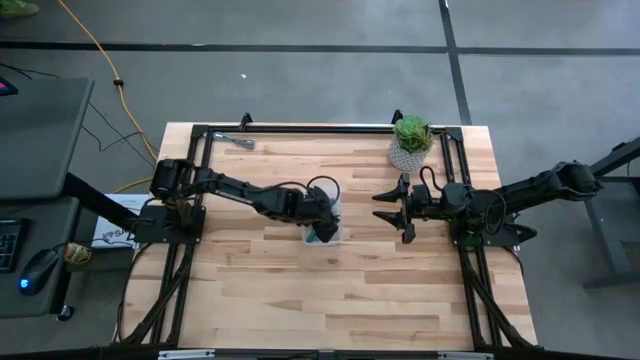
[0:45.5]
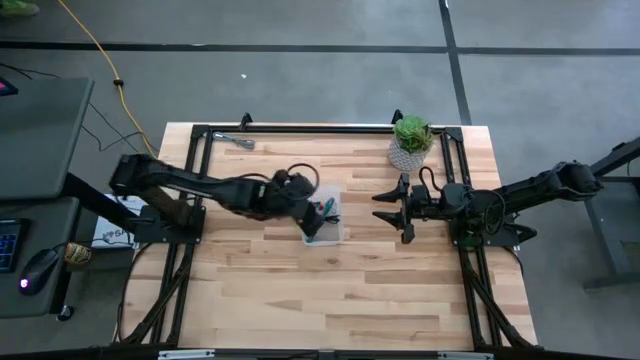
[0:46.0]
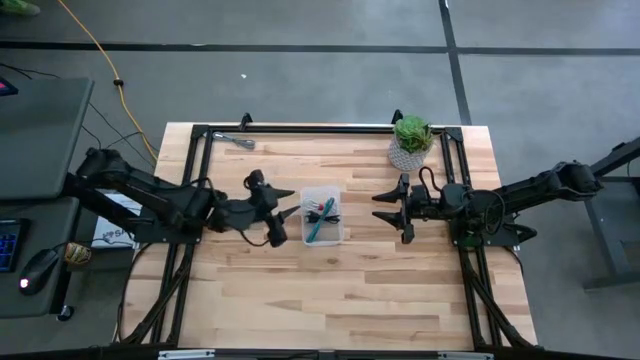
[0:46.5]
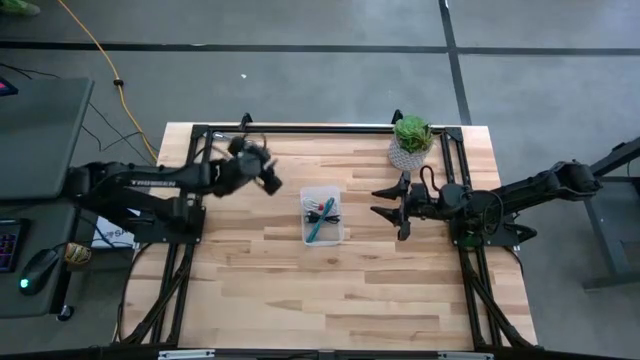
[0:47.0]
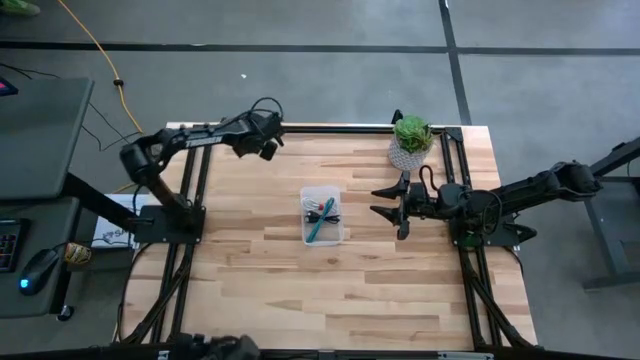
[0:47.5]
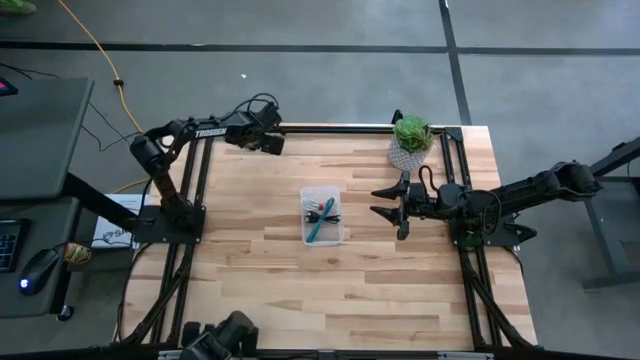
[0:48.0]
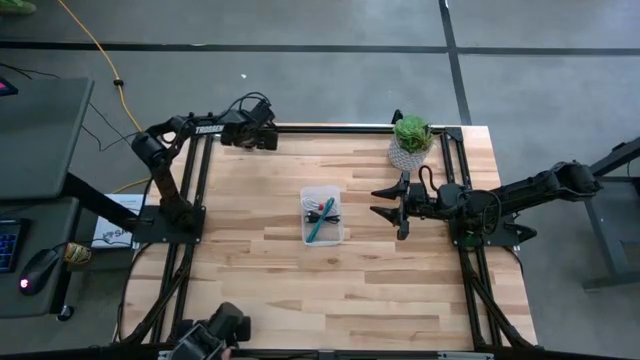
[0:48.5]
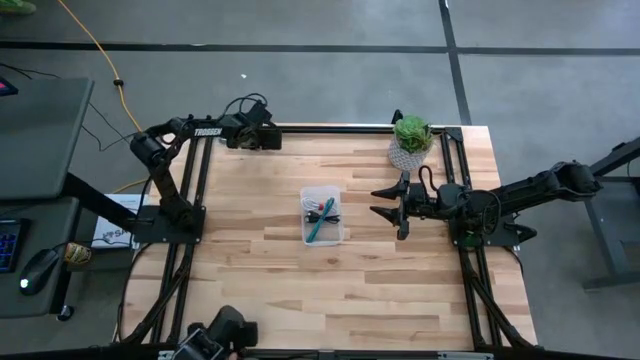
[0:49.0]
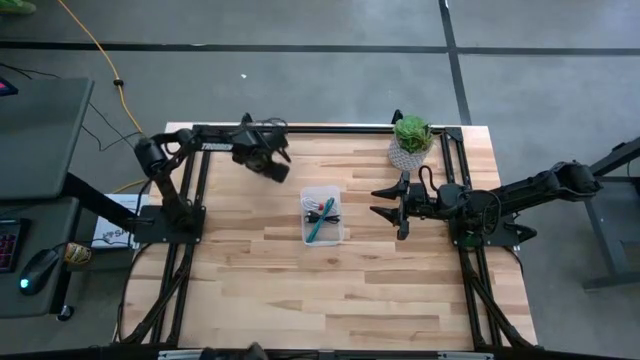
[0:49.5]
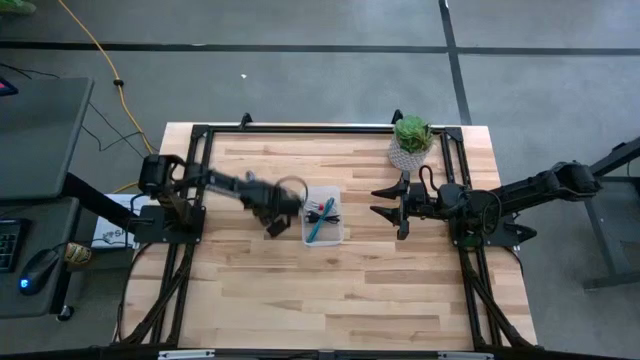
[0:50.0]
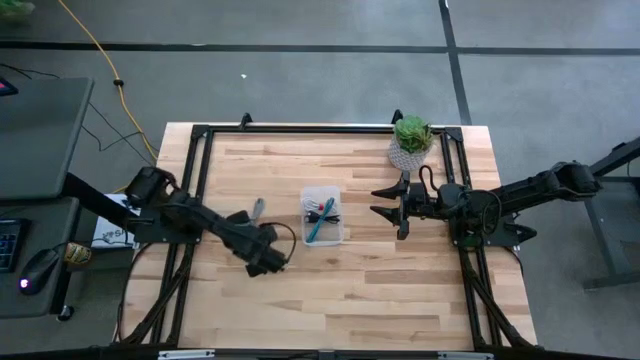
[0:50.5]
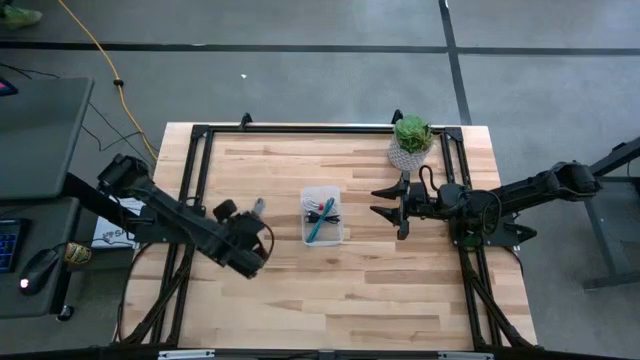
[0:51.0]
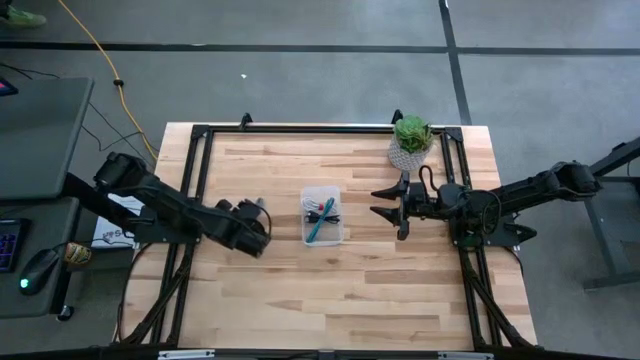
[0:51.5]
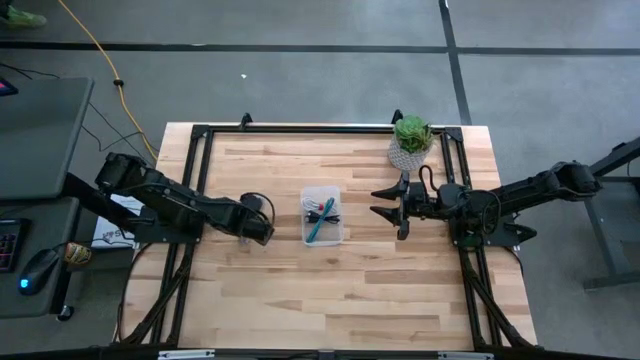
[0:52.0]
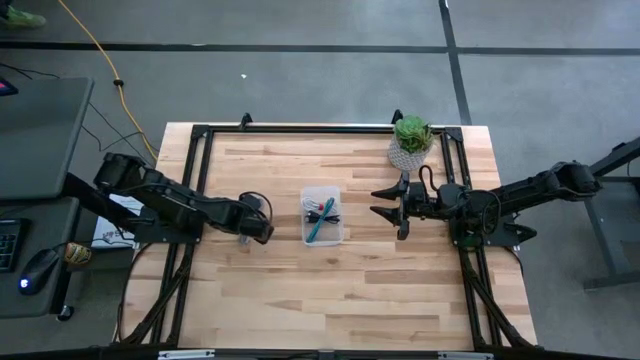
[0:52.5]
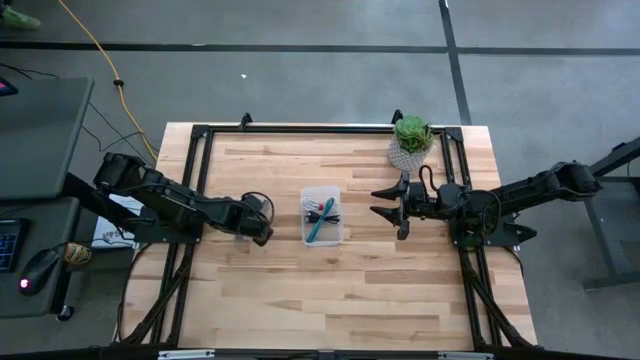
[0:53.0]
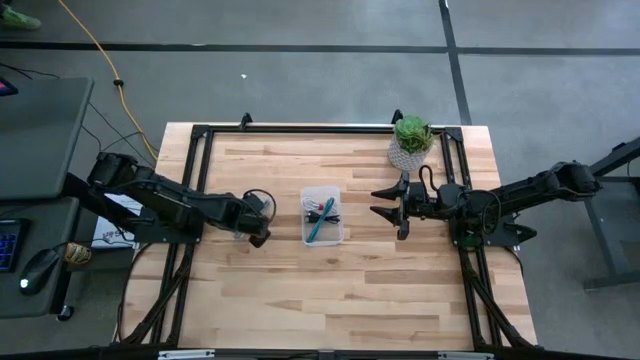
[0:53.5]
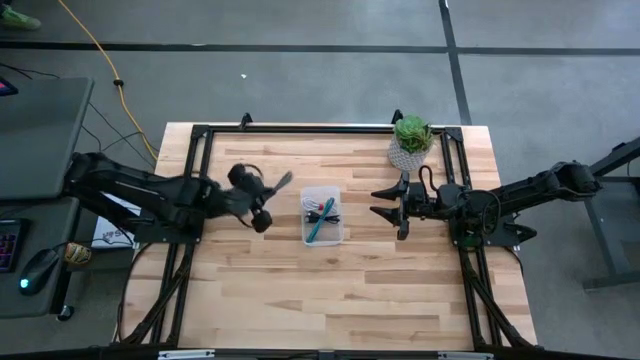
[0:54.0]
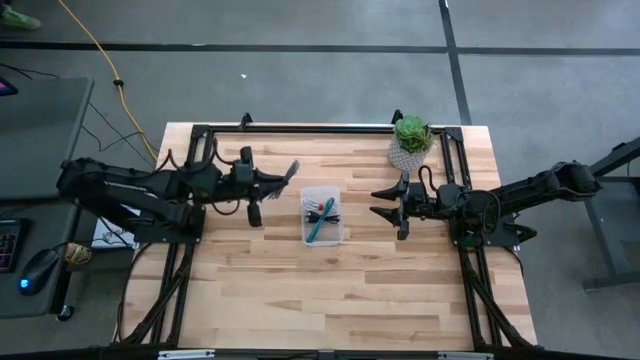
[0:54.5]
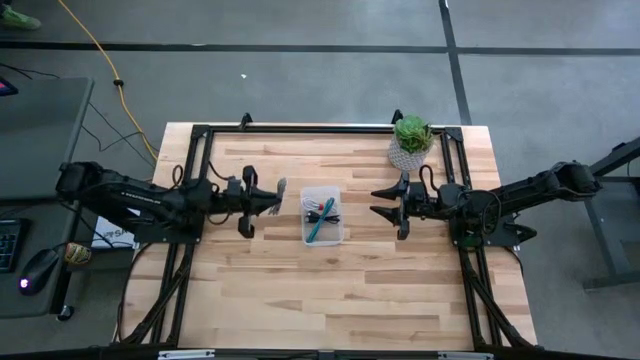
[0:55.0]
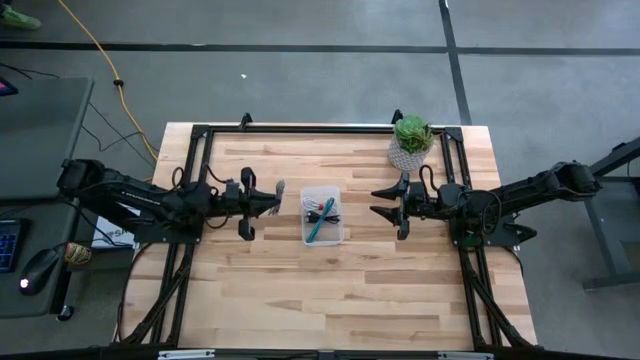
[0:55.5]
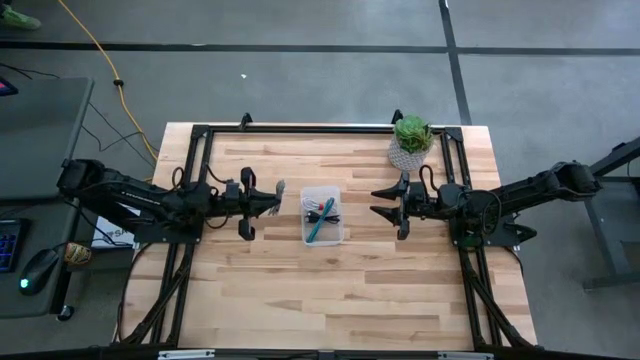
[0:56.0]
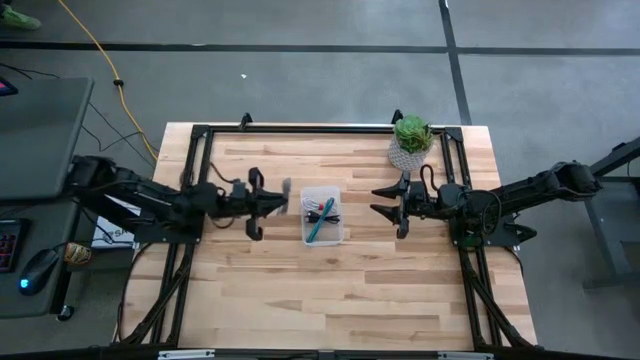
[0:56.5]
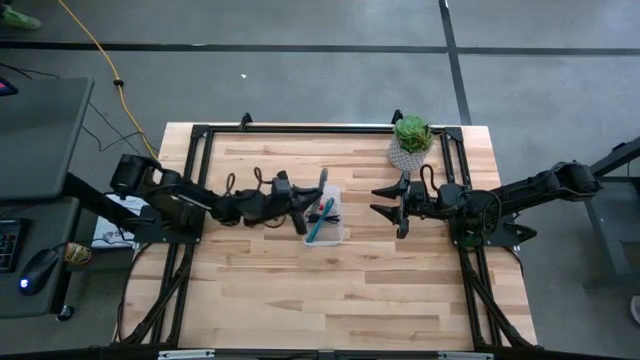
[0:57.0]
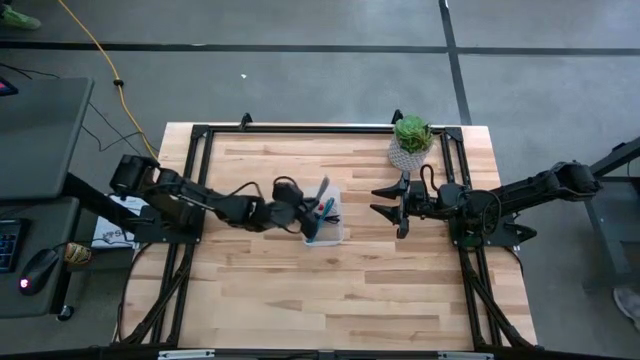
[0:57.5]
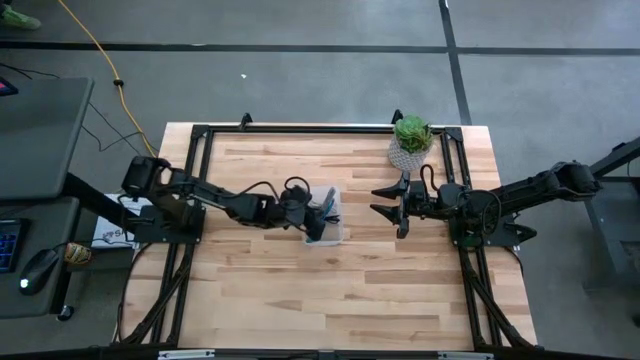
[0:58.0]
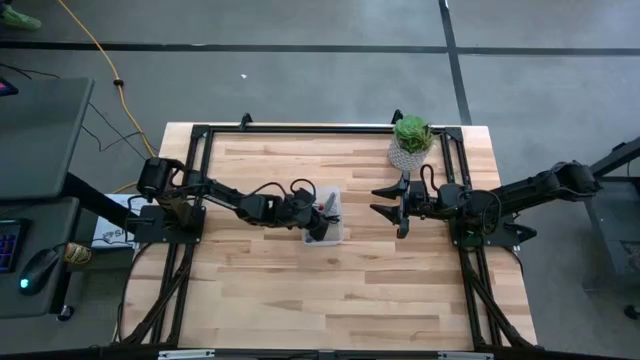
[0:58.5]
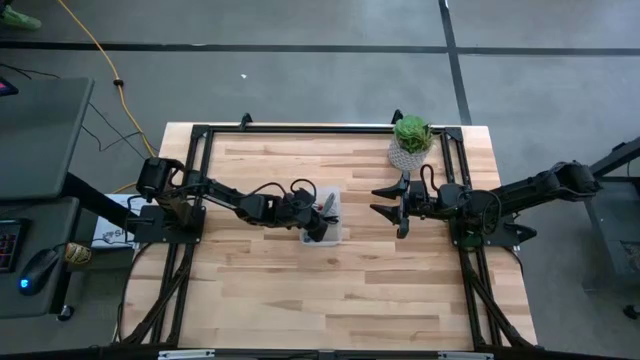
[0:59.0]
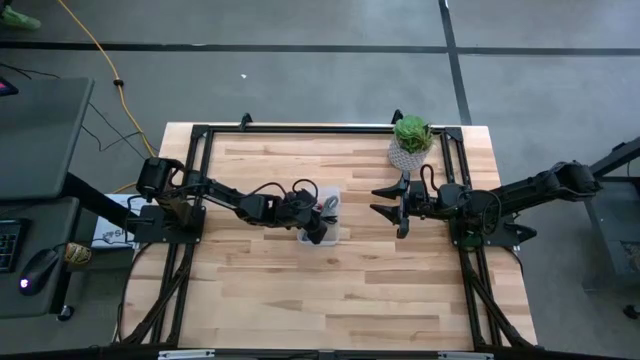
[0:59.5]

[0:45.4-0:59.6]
Task: Pick and place USB-C Cables
Put the white charger cable into the transparent bin

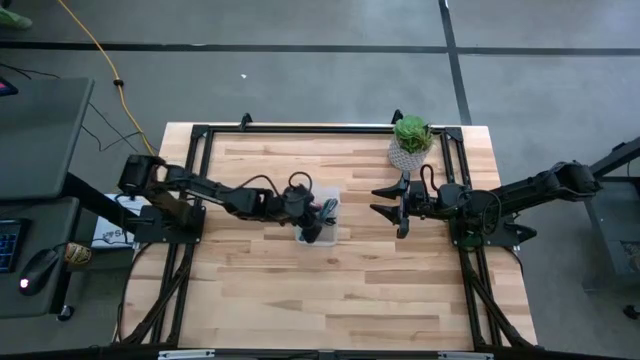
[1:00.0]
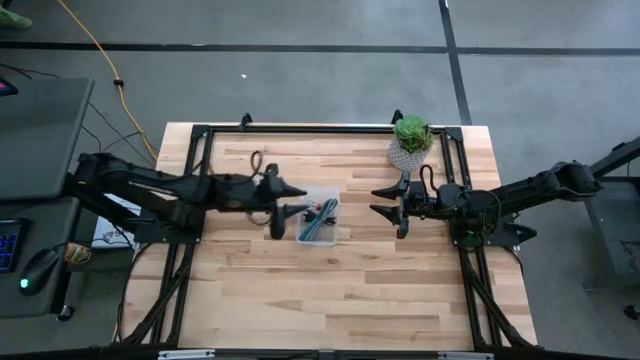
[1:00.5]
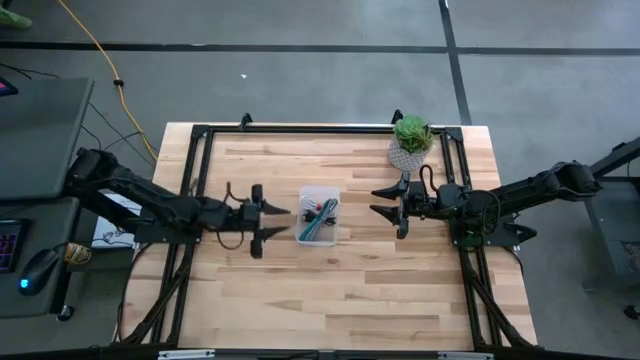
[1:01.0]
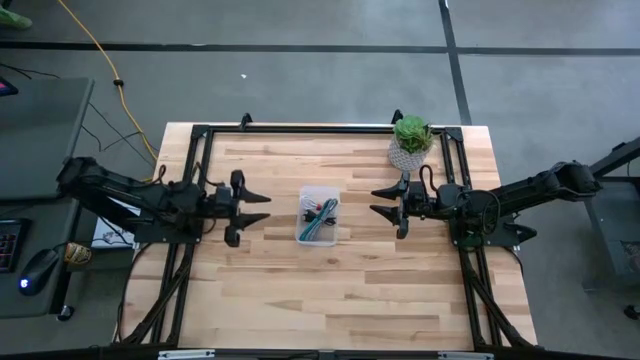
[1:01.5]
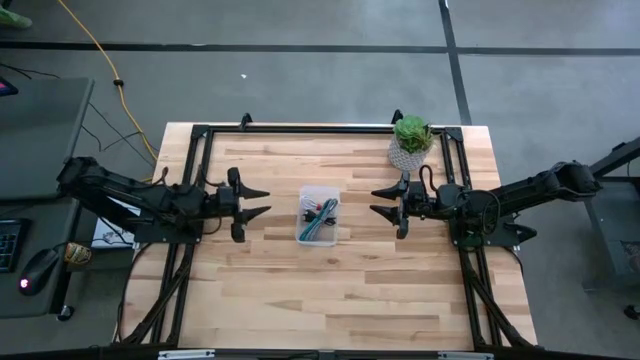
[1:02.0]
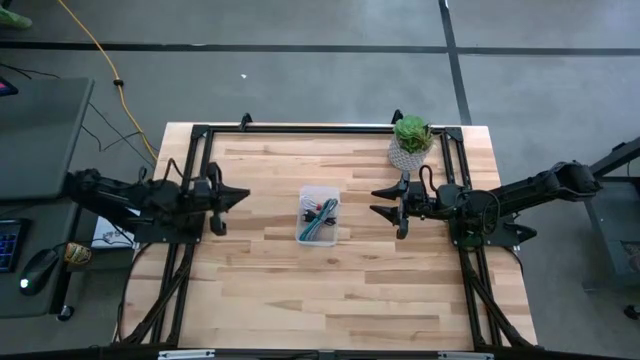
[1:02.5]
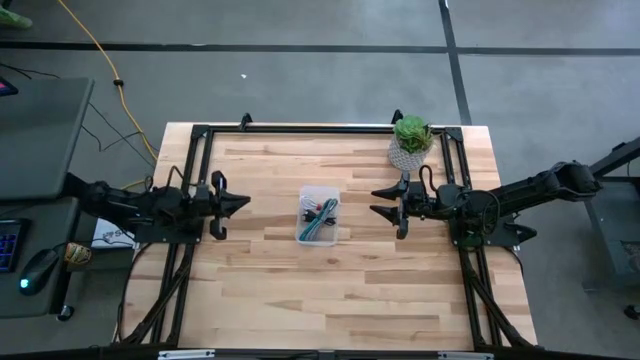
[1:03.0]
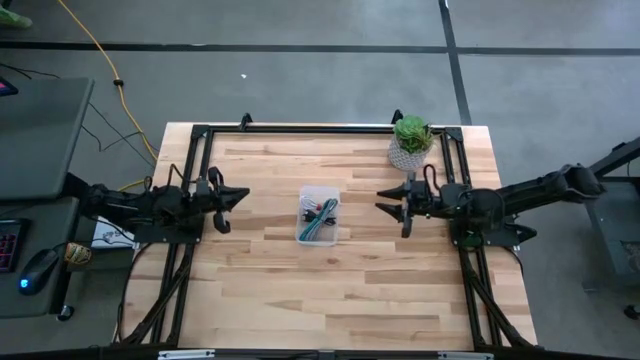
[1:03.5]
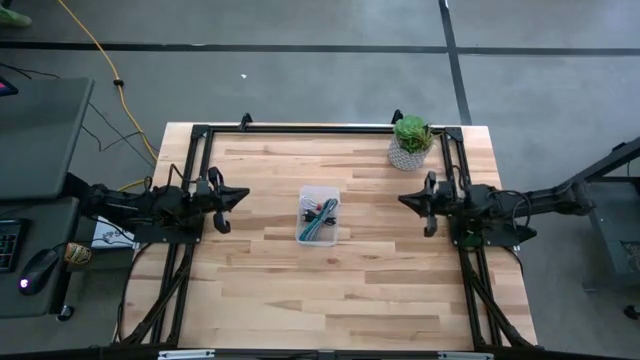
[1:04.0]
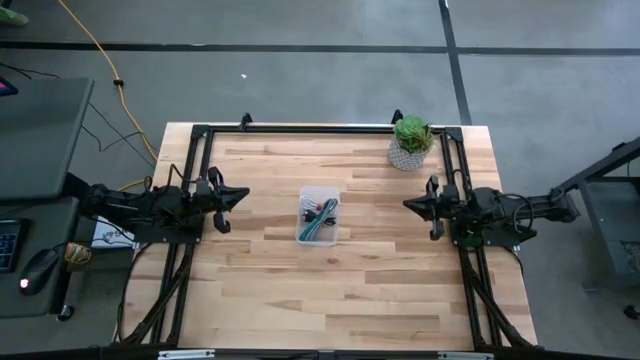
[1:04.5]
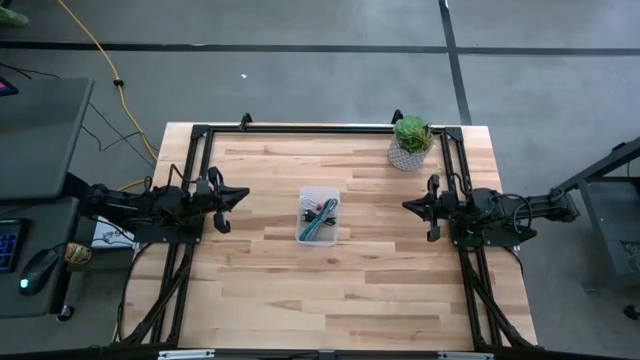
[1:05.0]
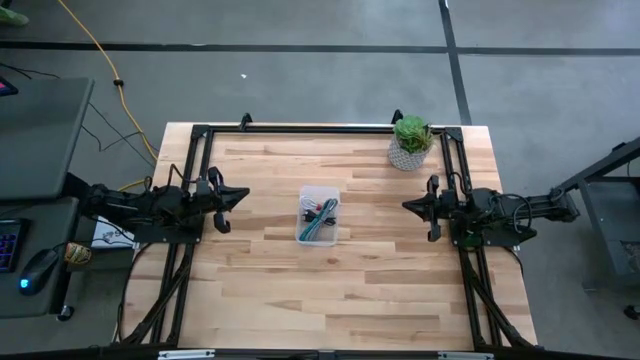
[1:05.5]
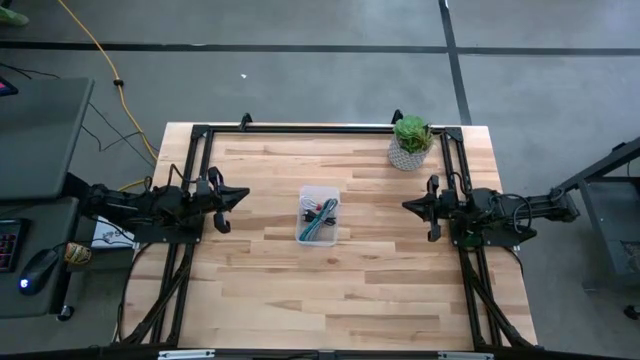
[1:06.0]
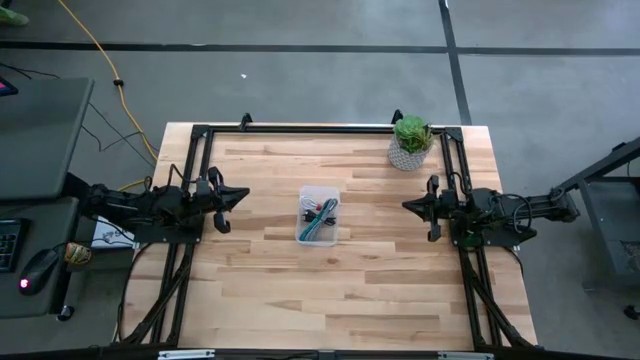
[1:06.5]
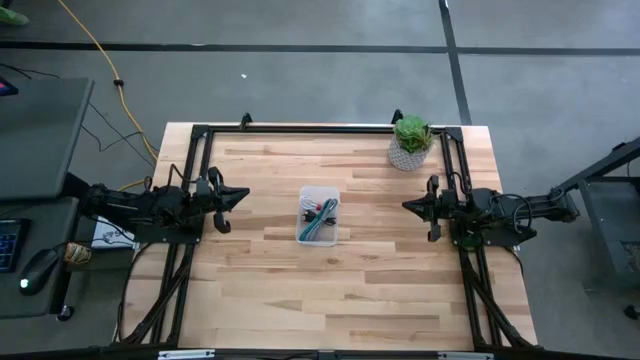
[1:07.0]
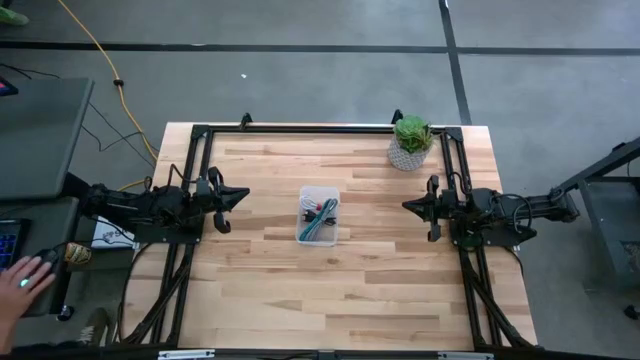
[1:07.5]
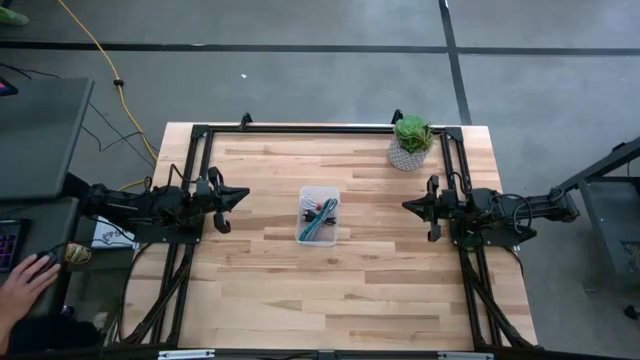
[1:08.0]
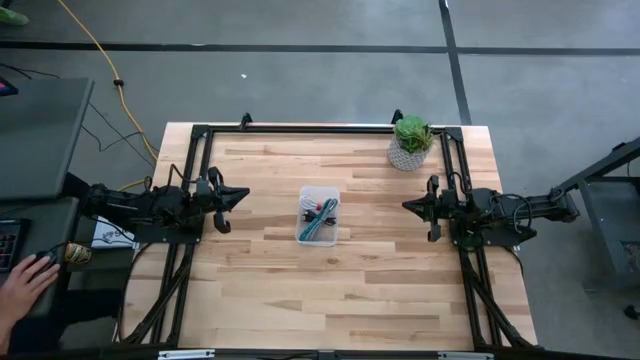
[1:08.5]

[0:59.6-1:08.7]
Return to Home Position
